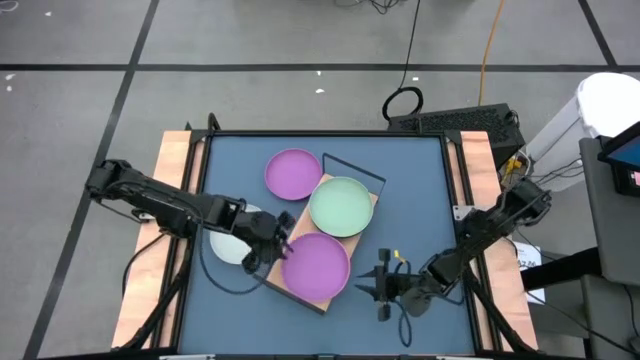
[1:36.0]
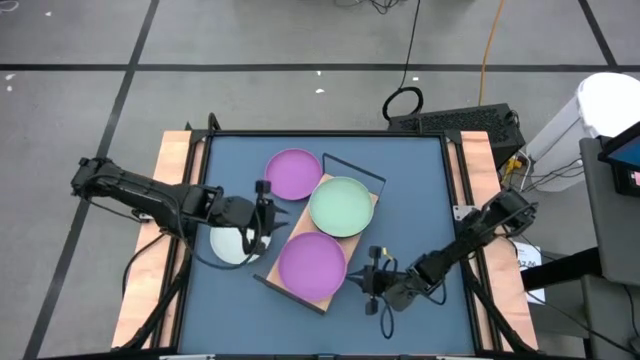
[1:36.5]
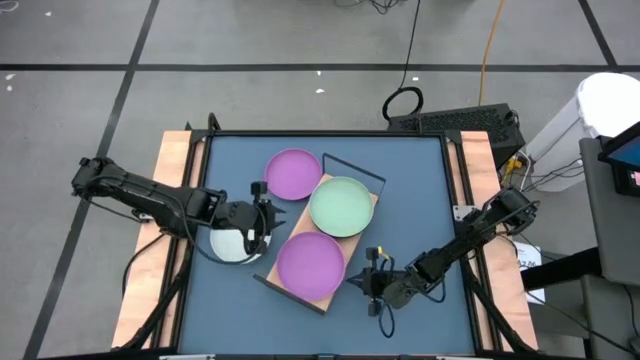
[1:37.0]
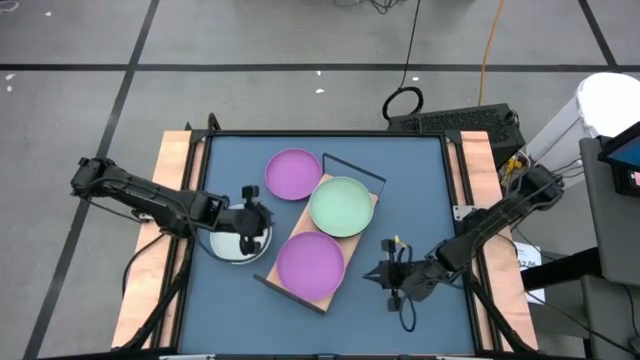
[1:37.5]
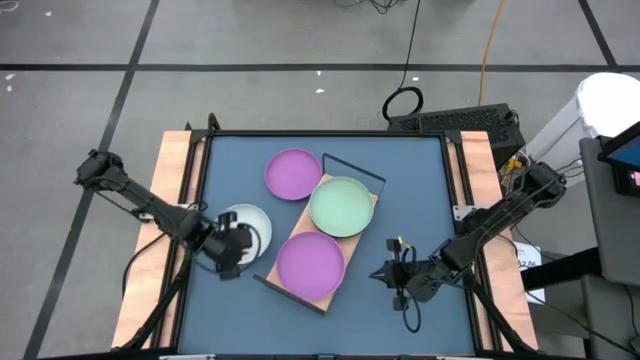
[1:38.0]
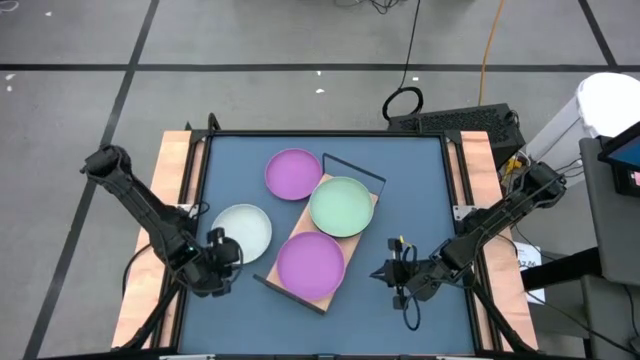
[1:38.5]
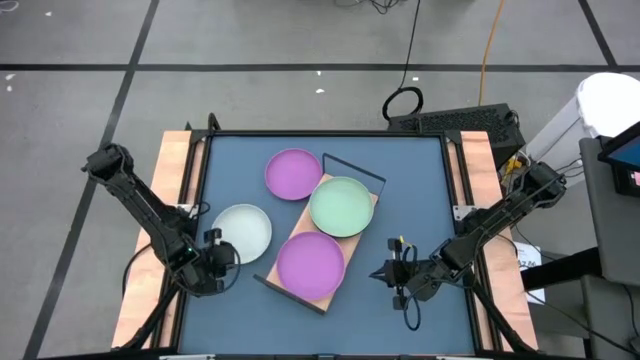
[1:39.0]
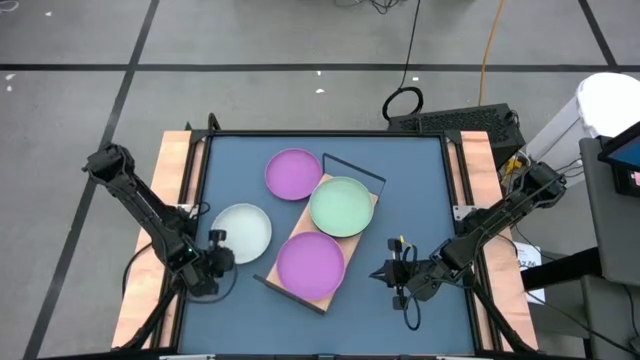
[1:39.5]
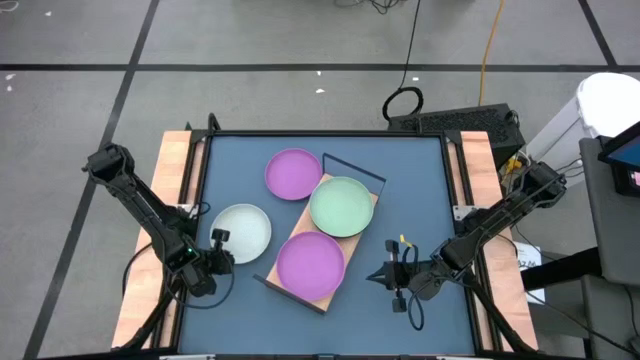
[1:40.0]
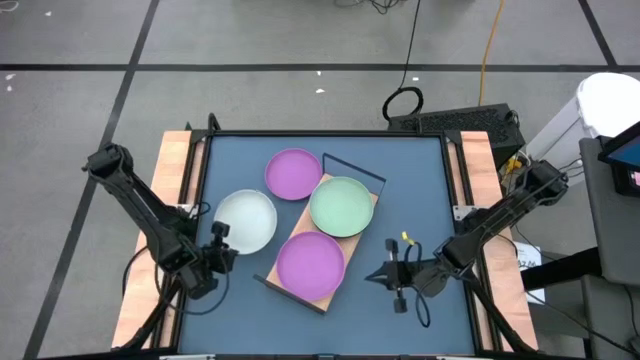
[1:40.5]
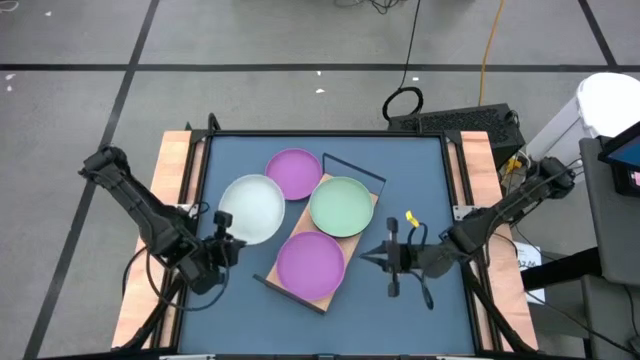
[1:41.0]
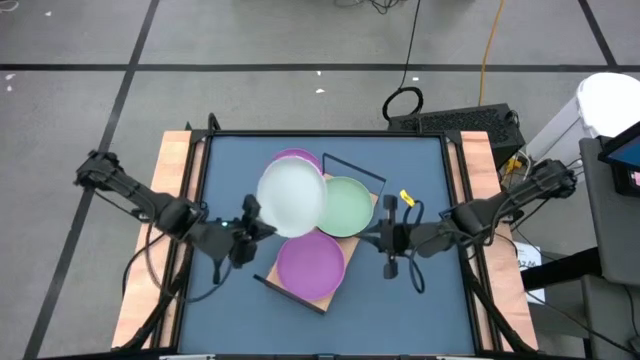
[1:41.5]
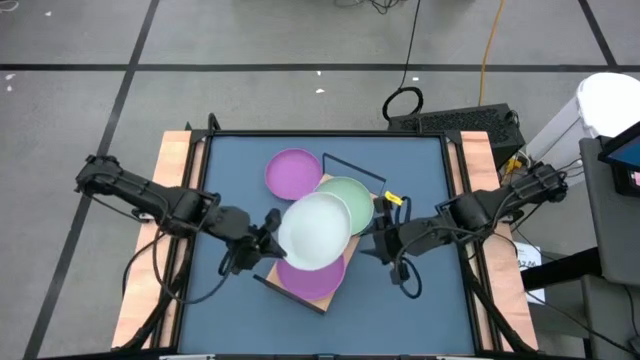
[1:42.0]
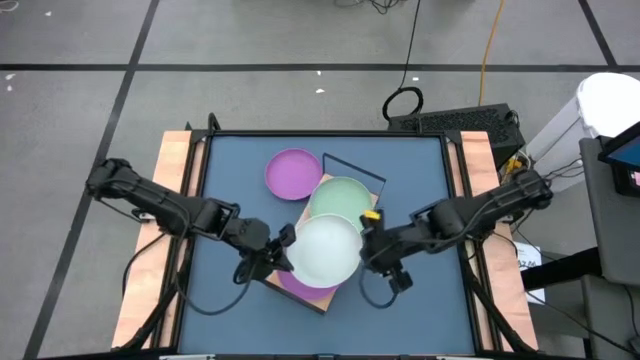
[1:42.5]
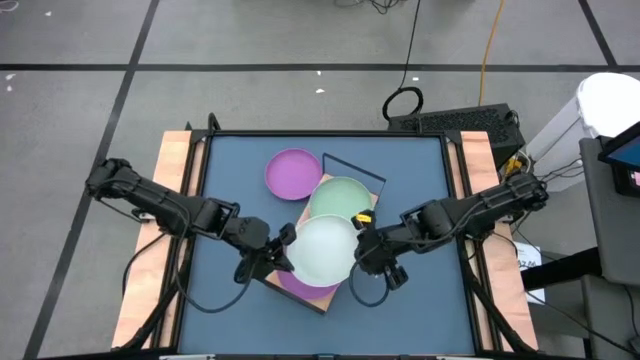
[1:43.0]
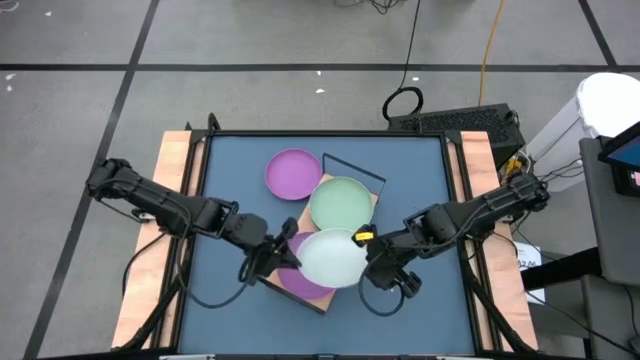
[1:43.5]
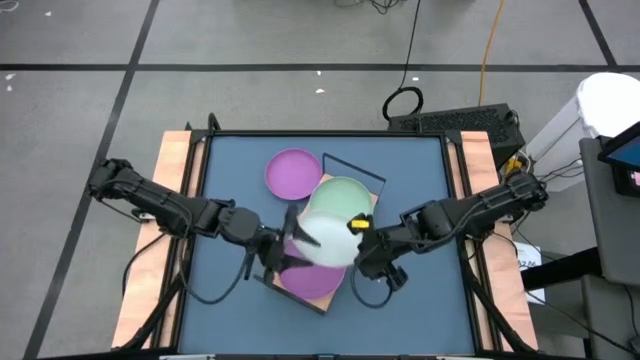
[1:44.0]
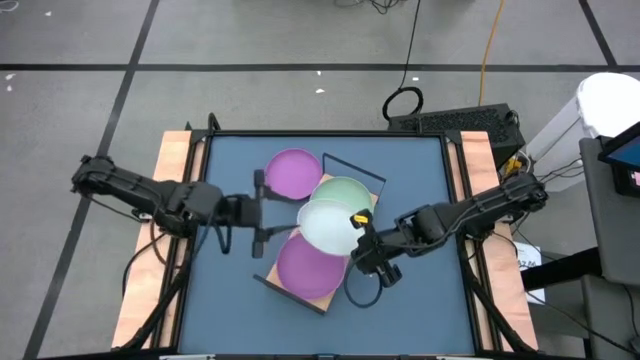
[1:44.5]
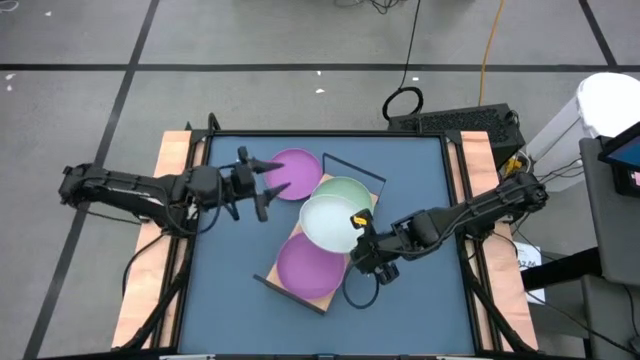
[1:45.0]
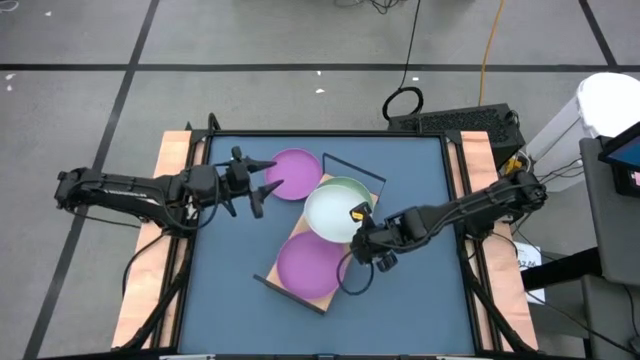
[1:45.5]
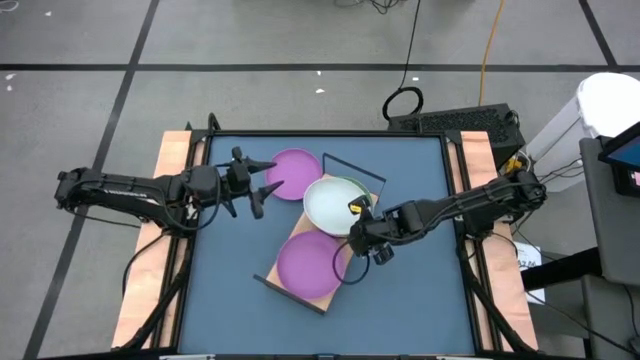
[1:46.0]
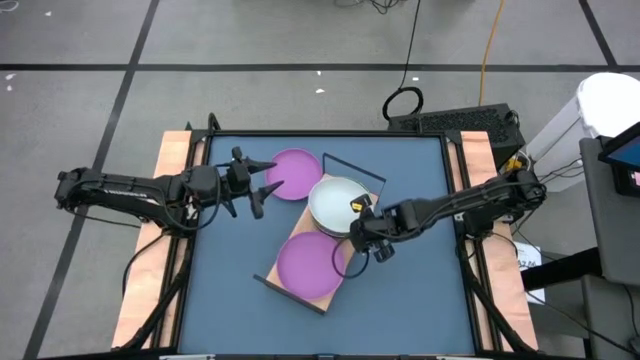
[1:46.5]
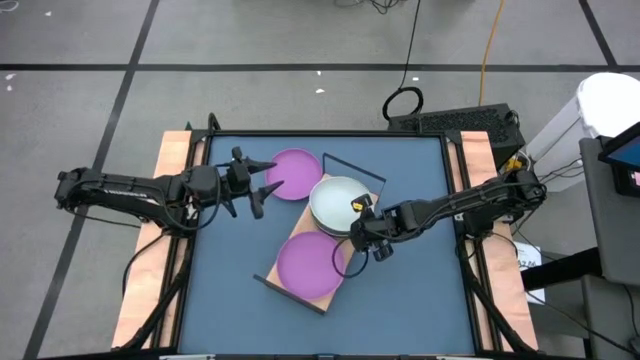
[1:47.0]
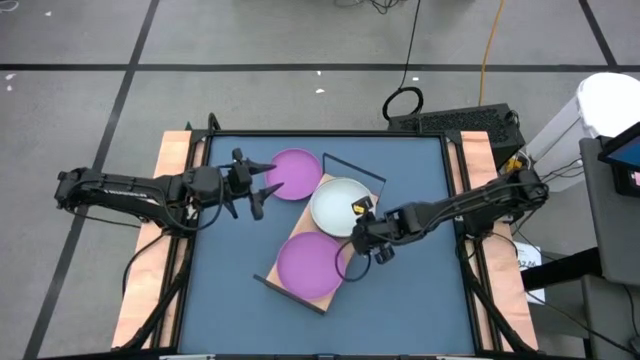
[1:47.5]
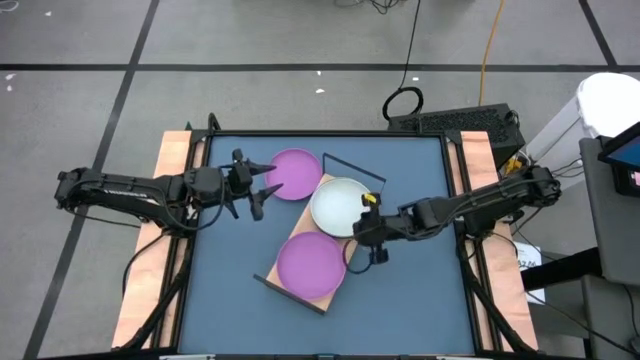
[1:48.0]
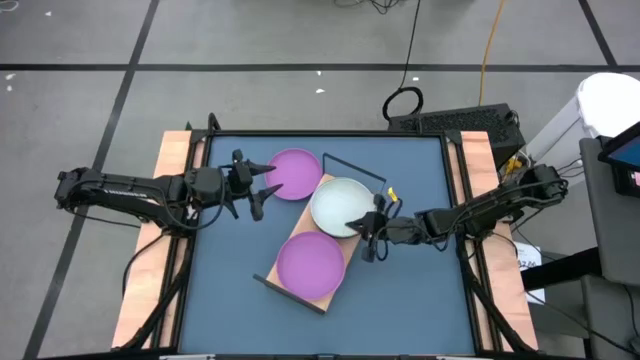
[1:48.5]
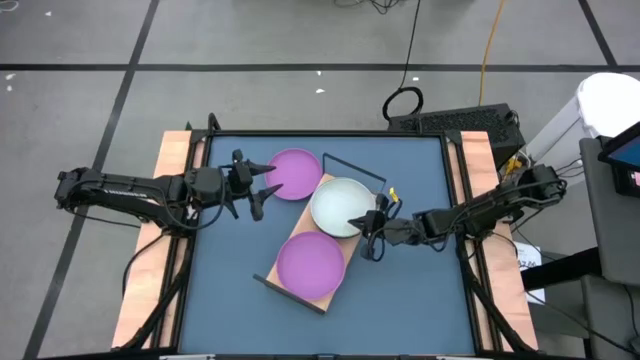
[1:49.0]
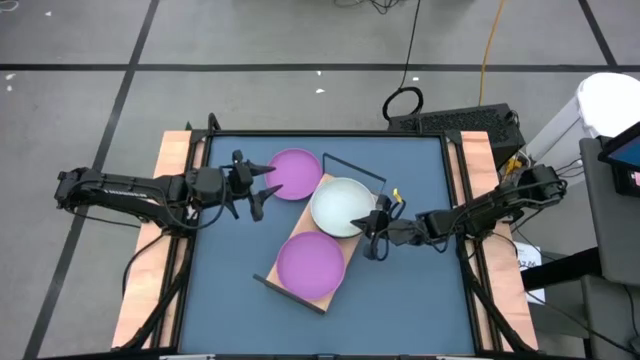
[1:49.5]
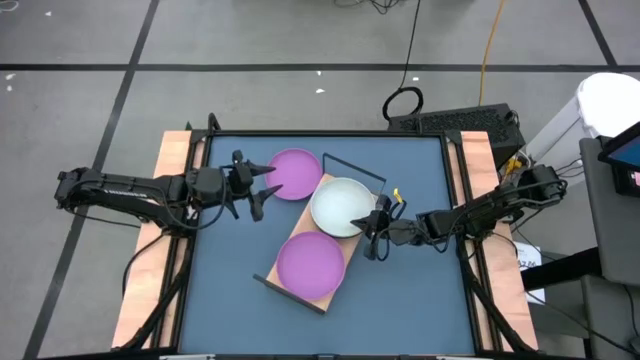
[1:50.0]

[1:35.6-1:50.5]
Task: Place and stack plates onto a shelf
Stack the gray plate on top of the green plate on the shelf

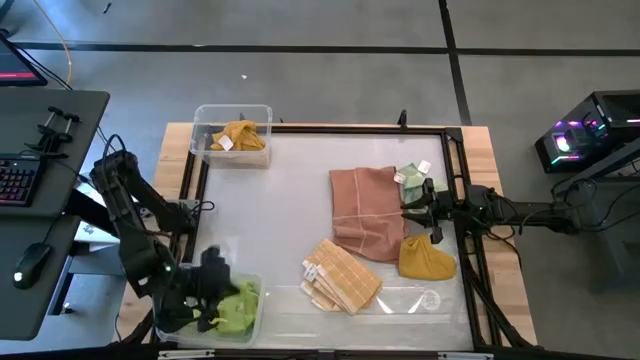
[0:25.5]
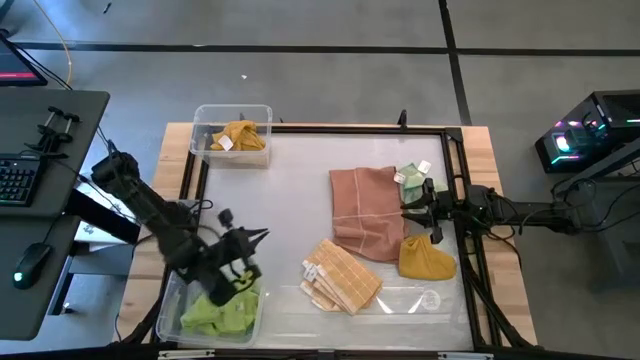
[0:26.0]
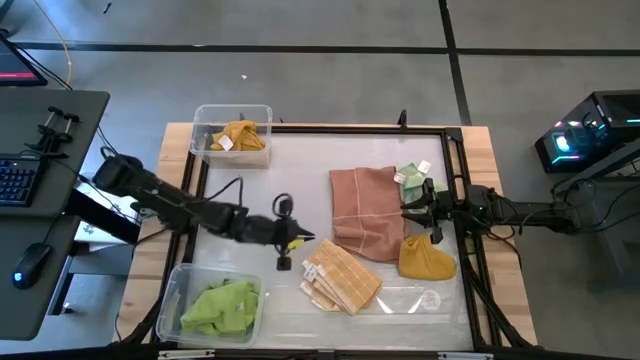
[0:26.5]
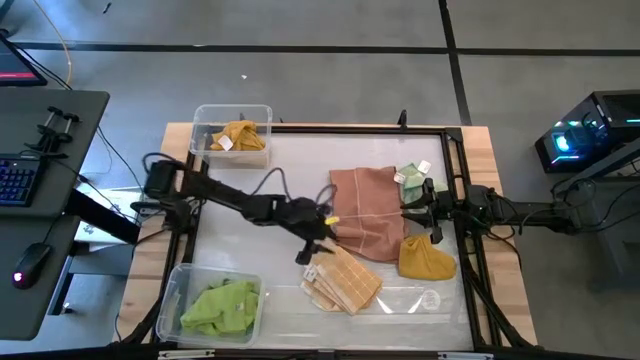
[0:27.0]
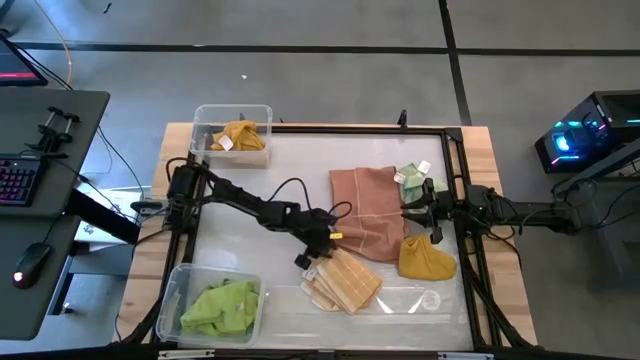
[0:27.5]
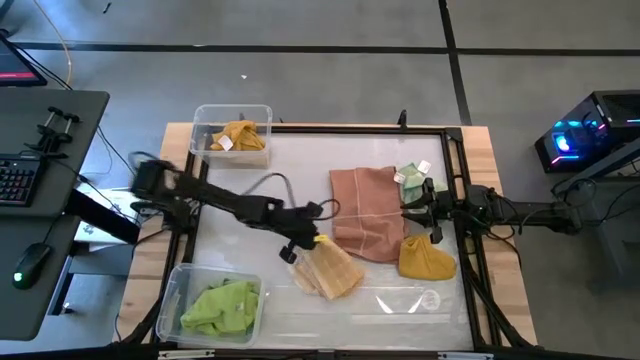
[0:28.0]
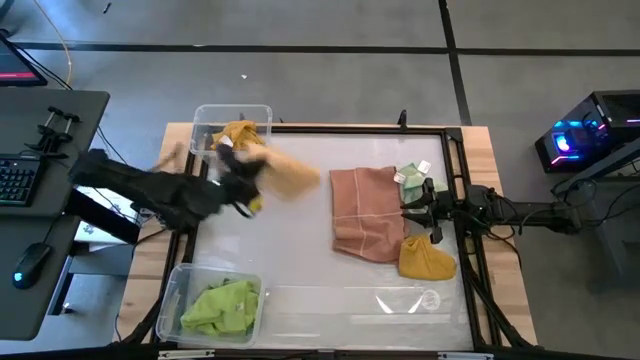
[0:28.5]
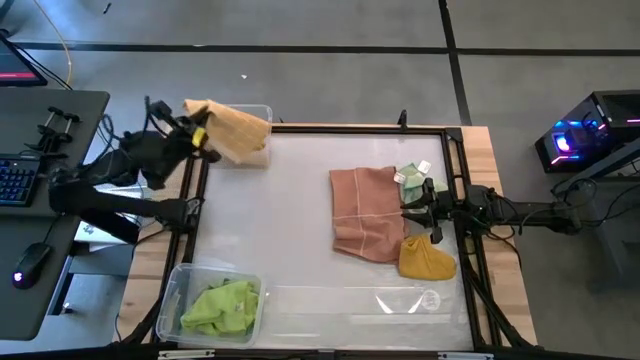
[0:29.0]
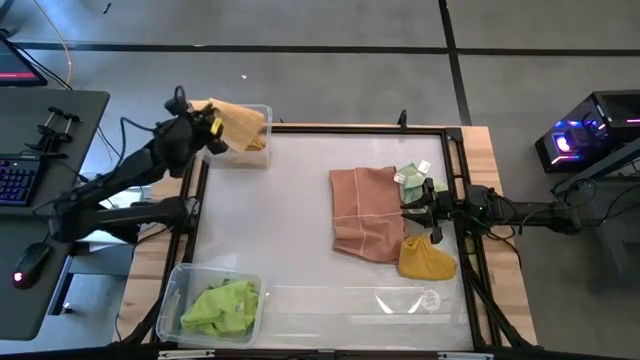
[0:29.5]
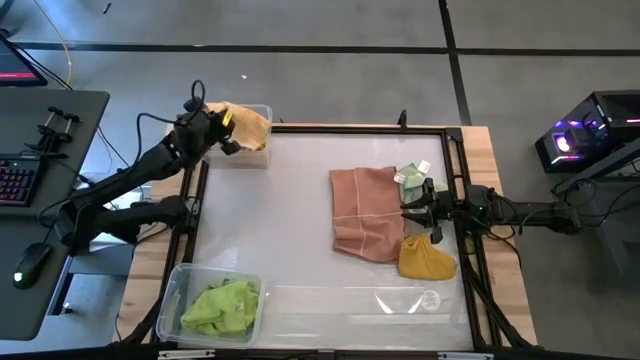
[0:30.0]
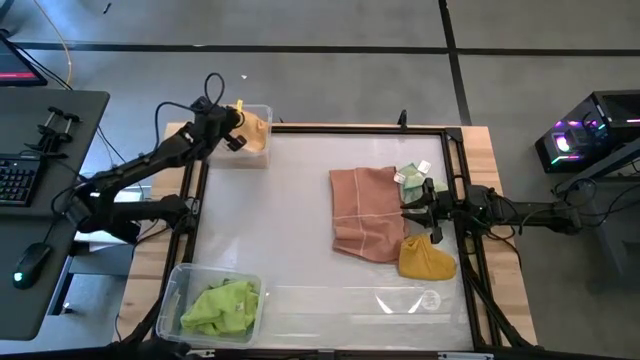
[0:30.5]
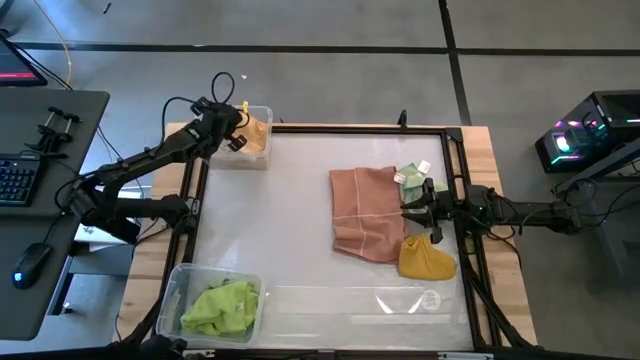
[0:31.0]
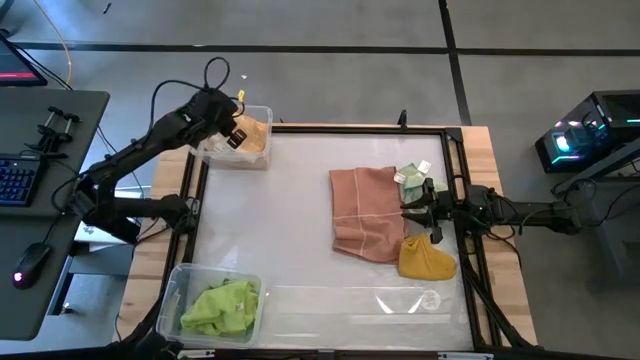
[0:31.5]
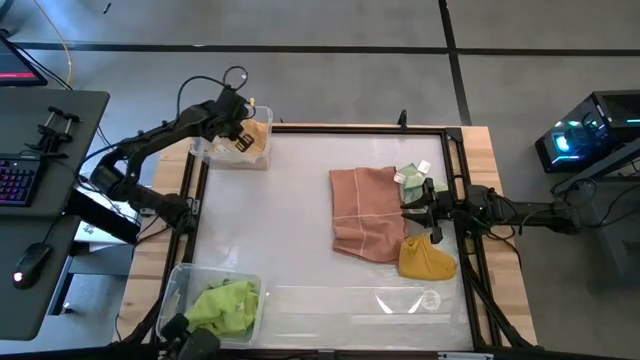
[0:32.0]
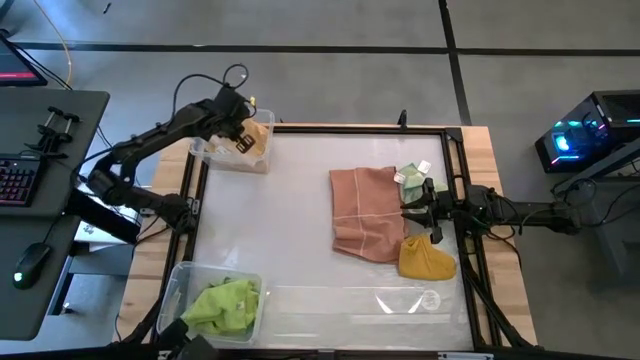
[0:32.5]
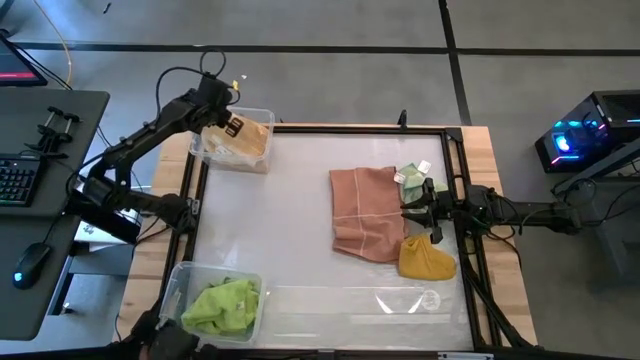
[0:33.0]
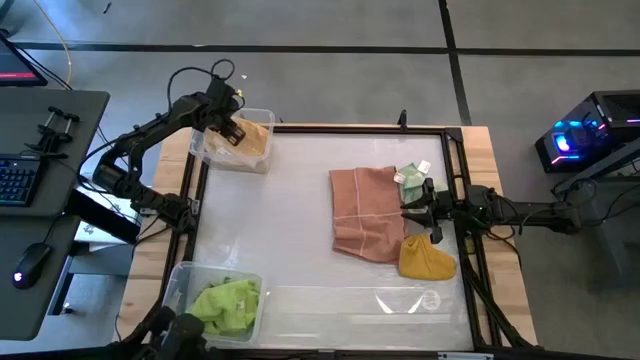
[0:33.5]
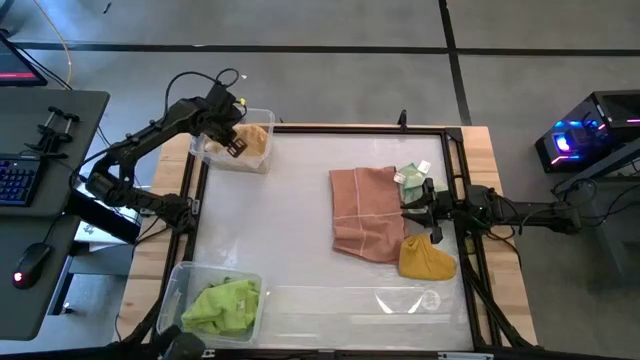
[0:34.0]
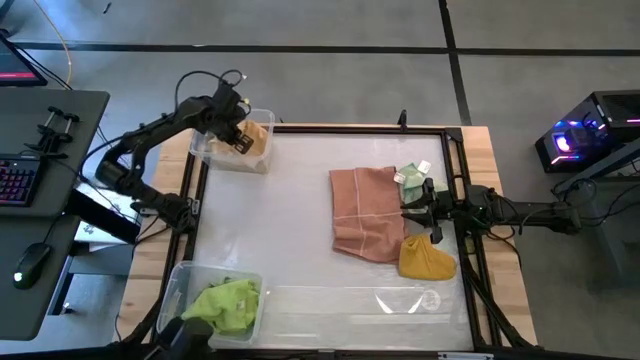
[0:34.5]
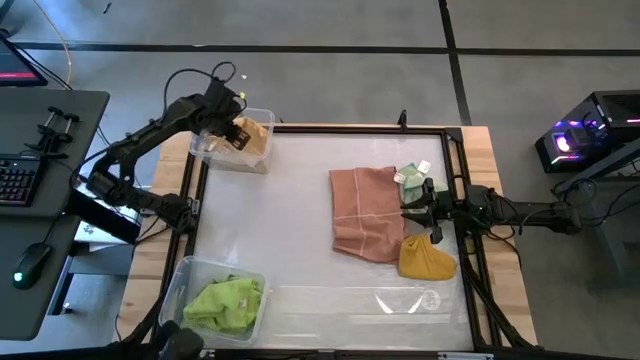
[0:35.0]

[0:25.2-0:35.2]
Task: Sort towels by color in basket
Put the yellow patterned towel into the top transparent bin
